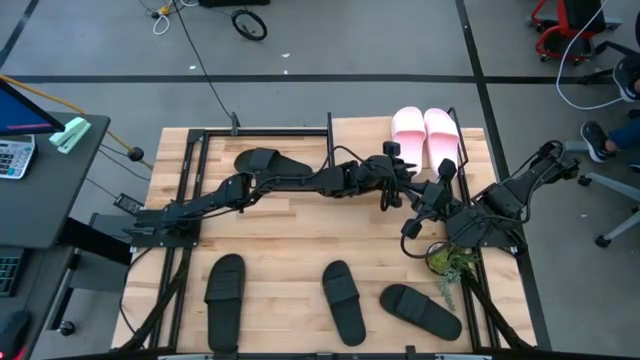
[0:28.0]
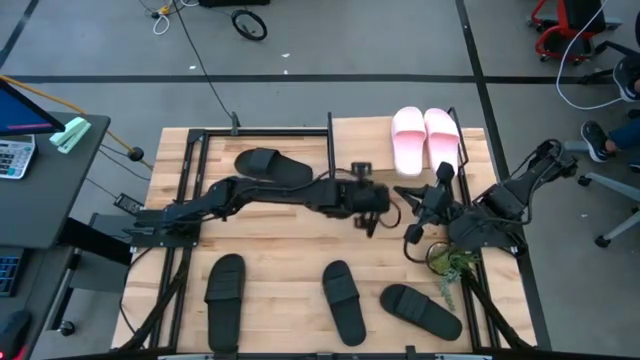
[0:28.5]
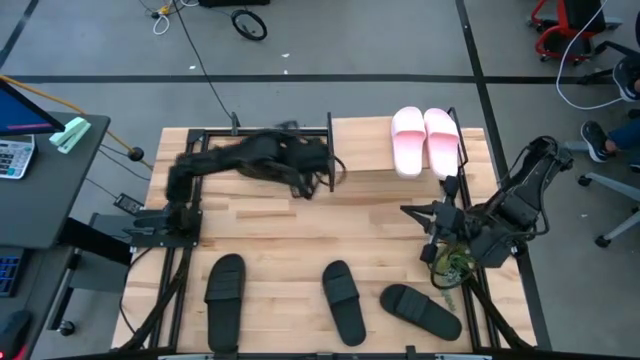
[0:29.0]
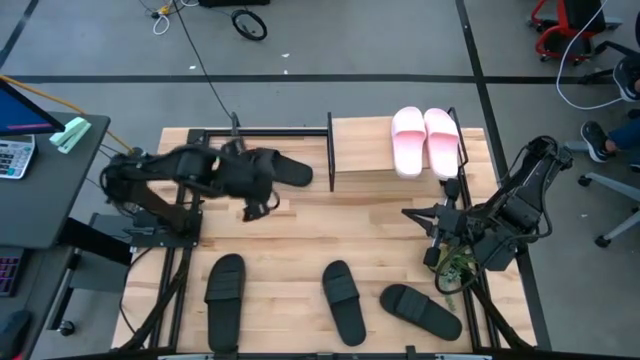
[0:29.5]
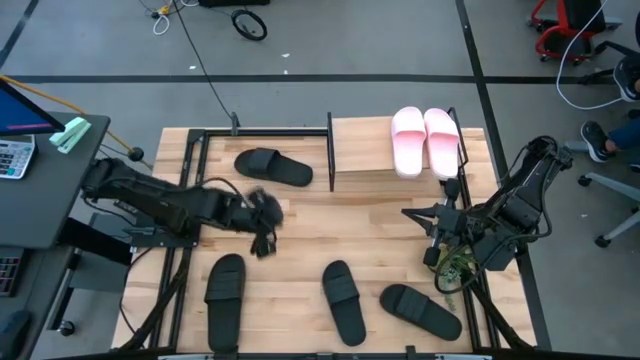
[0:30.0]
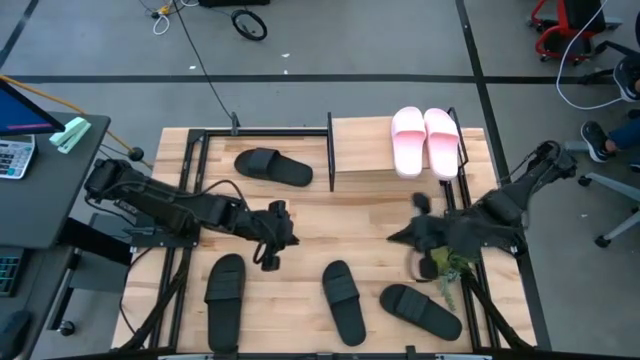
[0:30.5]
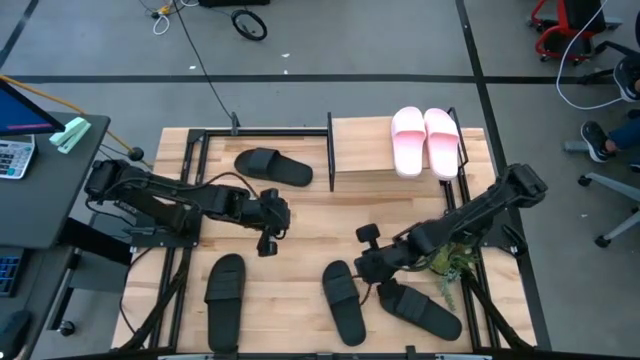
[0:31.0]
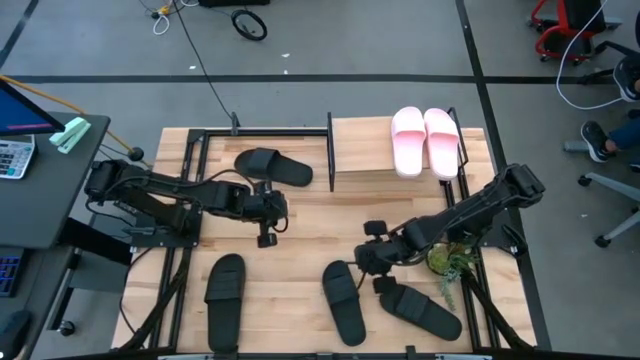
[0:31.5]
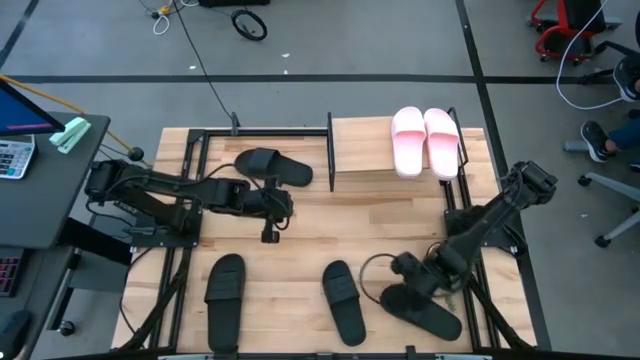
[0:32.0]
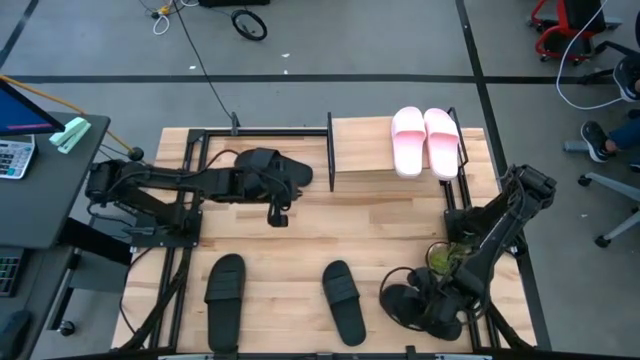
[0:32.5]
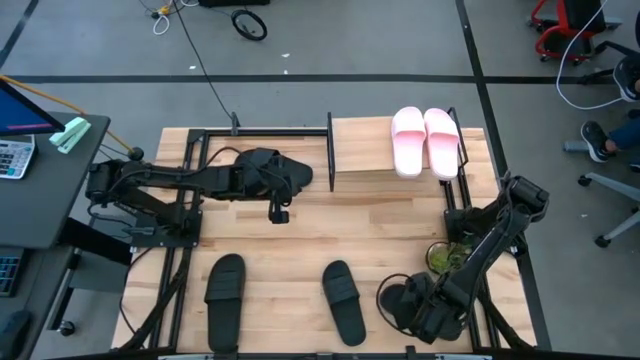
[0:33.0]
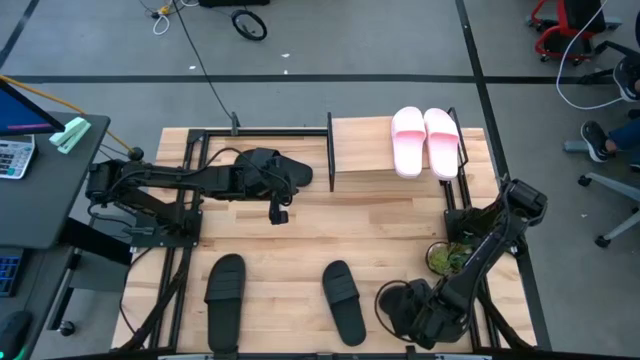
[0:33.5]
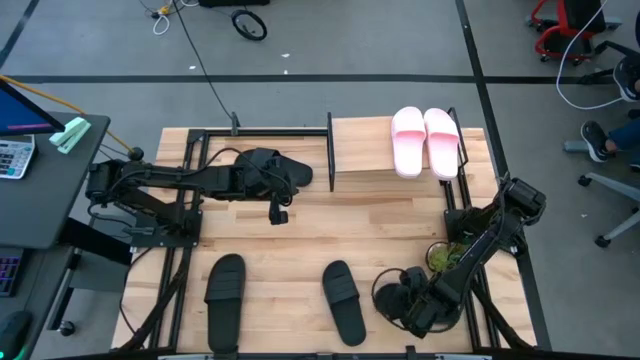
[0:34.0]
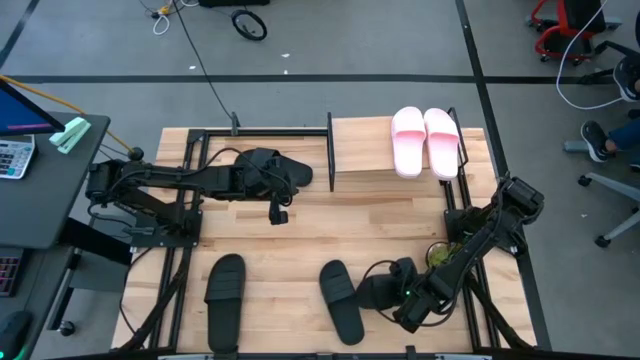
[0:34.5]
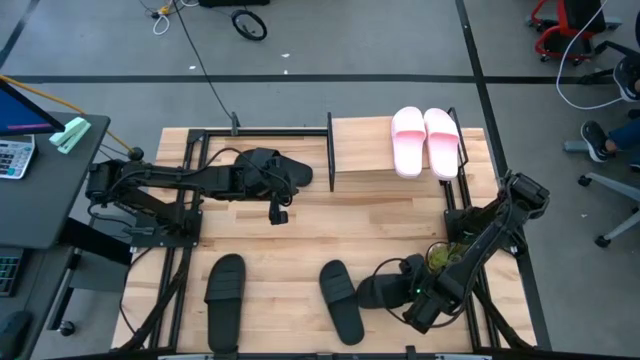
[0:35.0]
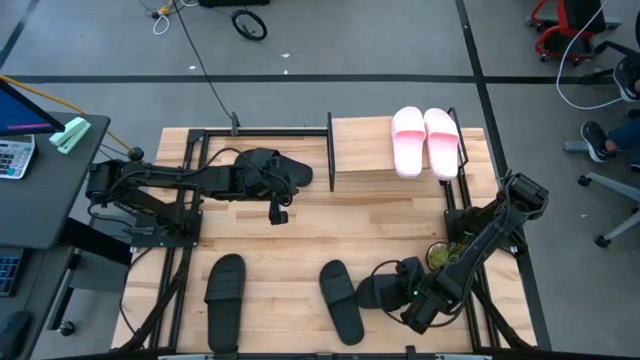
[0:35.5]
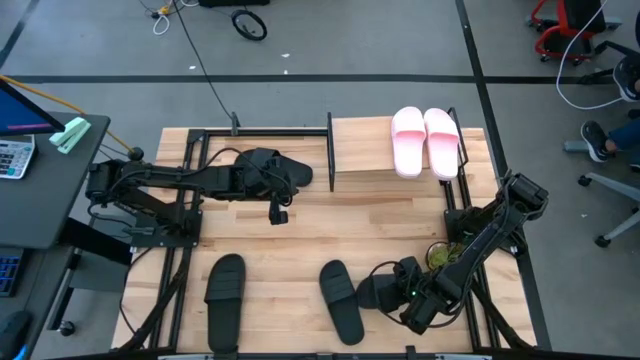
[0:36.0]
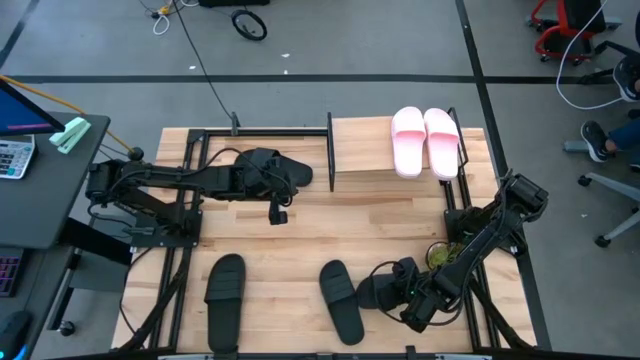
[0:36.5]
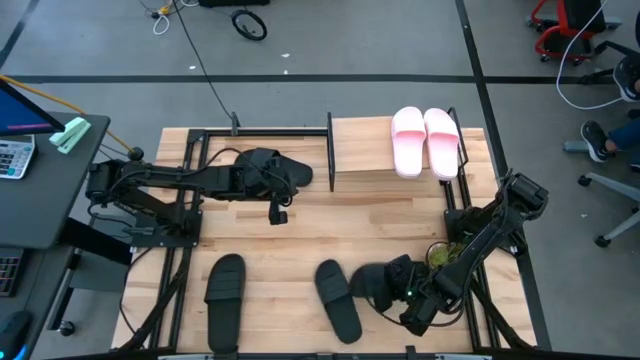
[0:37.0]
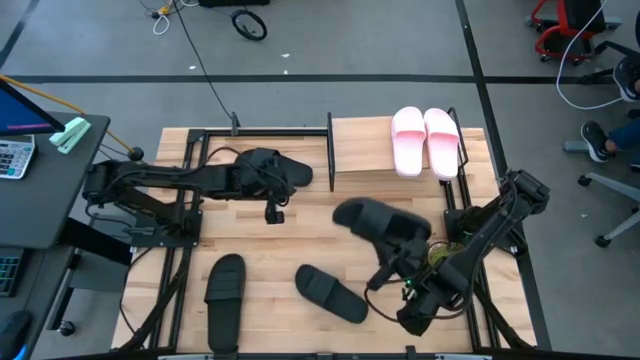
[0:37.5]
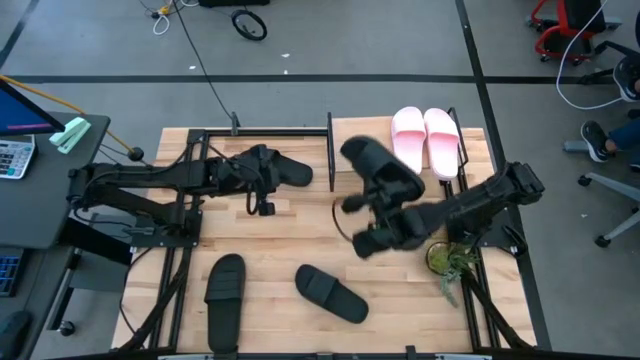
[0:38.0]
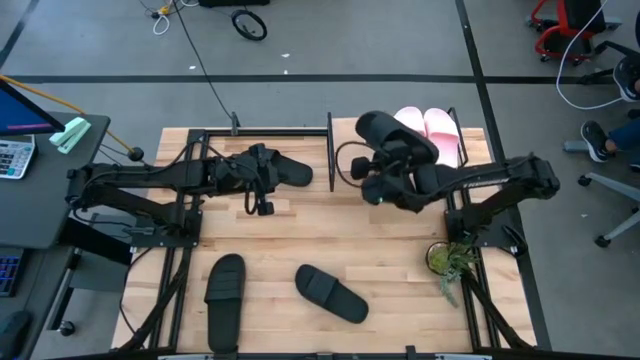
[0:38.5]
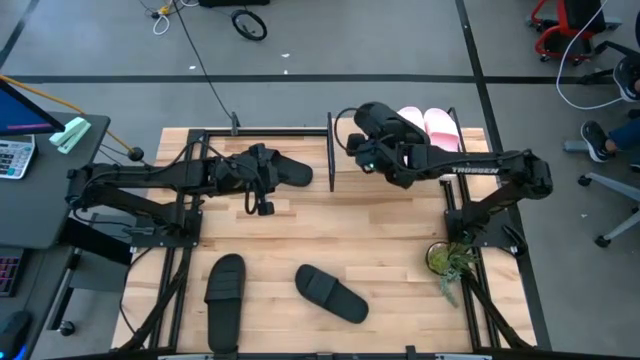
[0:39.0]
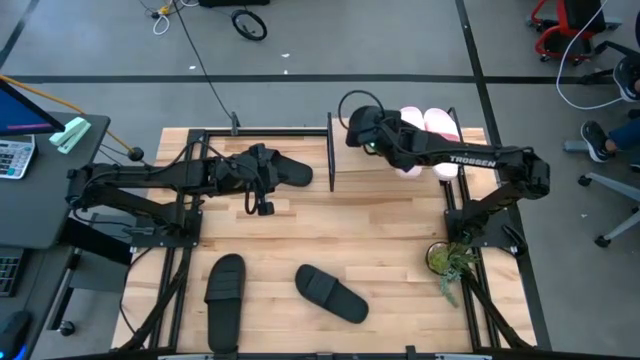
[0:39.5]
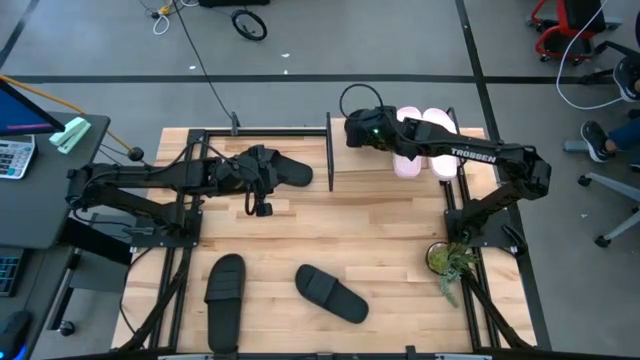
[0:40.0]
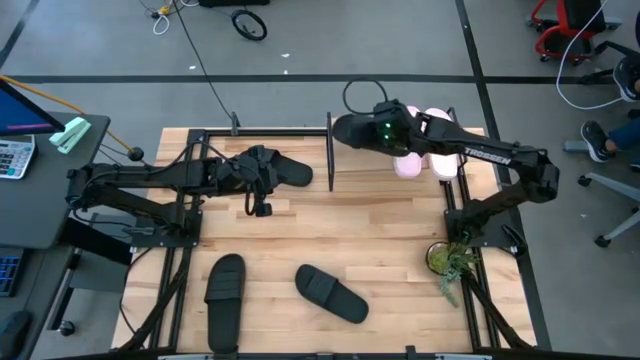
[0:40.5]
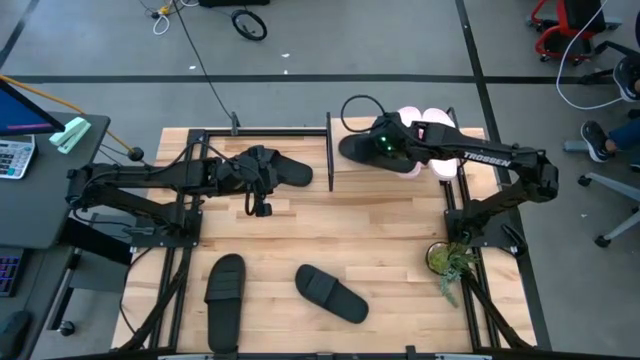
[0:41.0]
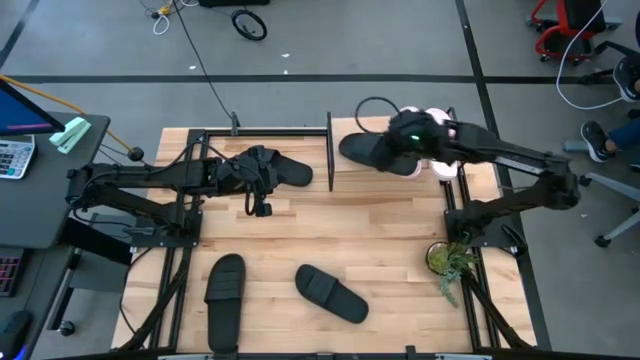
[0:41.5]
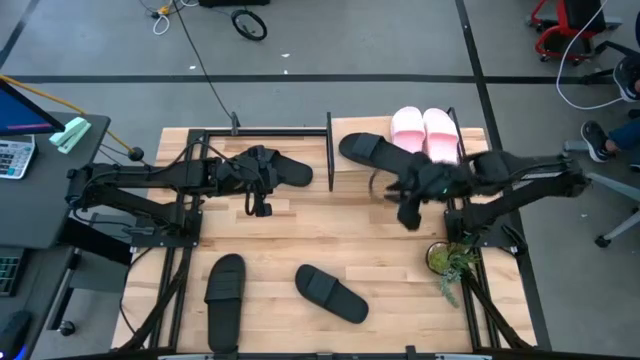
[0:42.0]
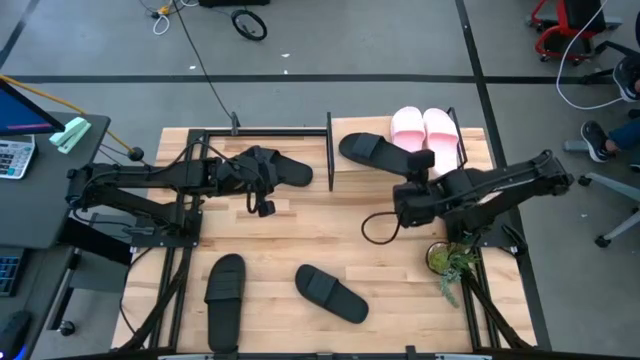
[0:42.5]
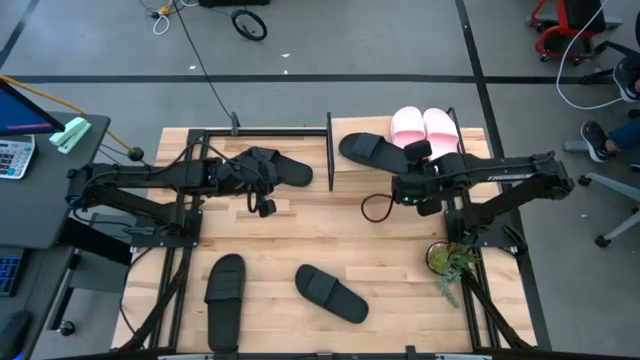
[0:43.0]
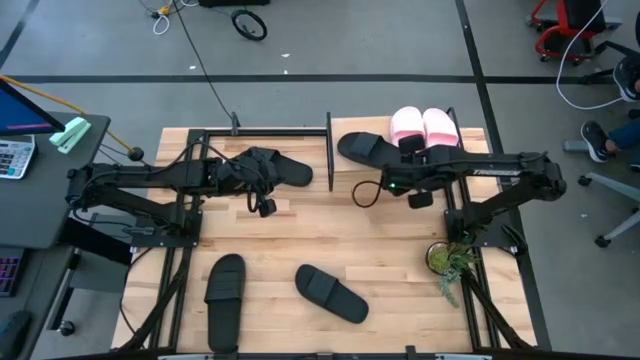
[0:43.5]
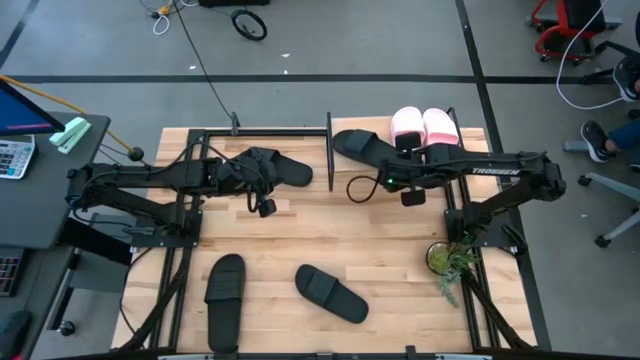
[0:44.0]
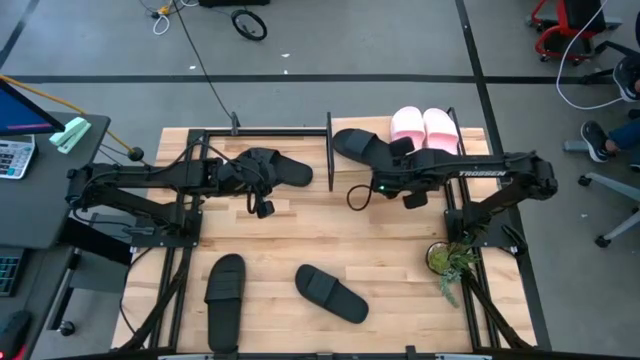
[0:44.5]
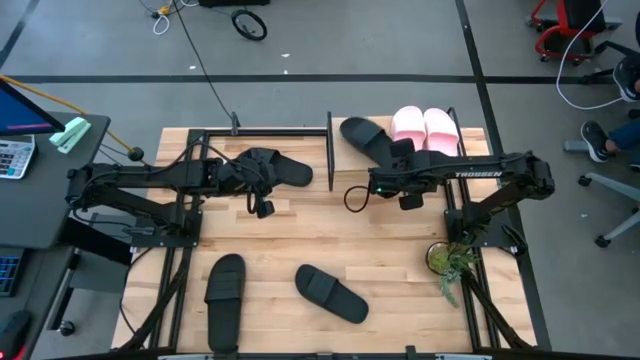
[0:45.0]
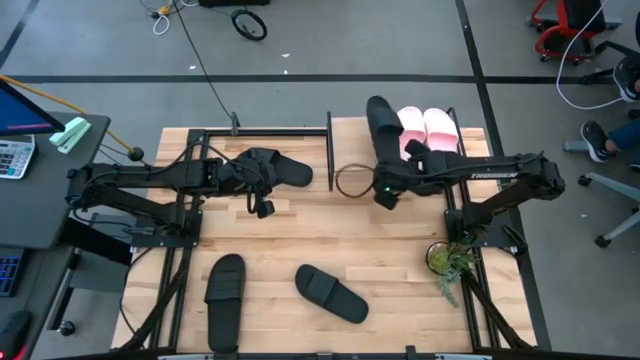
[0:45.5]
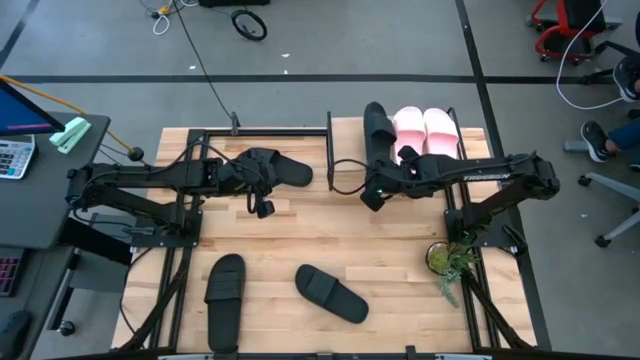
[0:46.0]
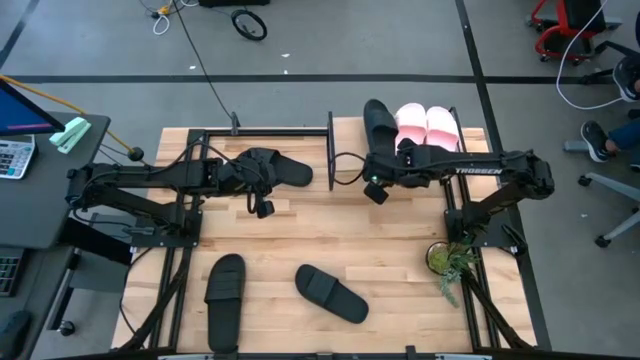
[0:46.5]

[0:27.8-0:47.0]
Task: Pick and place slides into the shelf
Put the black slide on the shelf

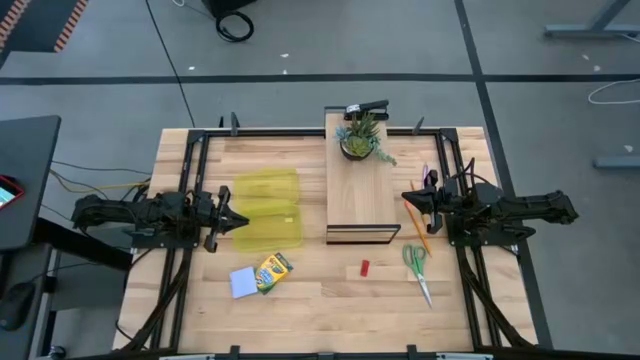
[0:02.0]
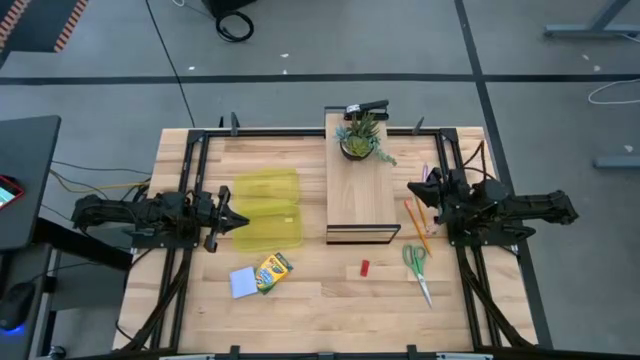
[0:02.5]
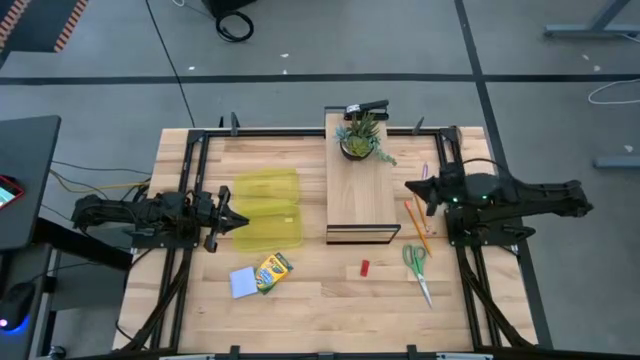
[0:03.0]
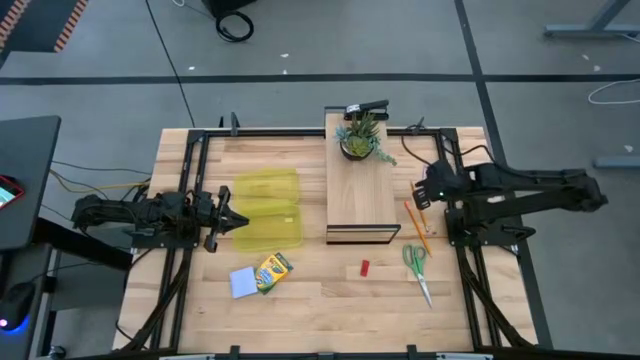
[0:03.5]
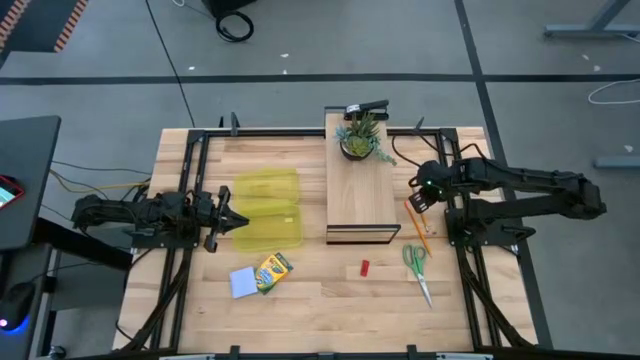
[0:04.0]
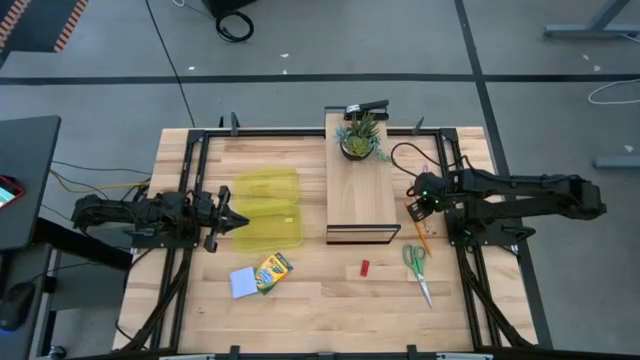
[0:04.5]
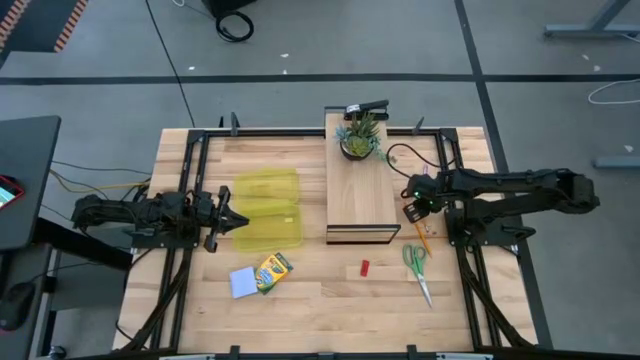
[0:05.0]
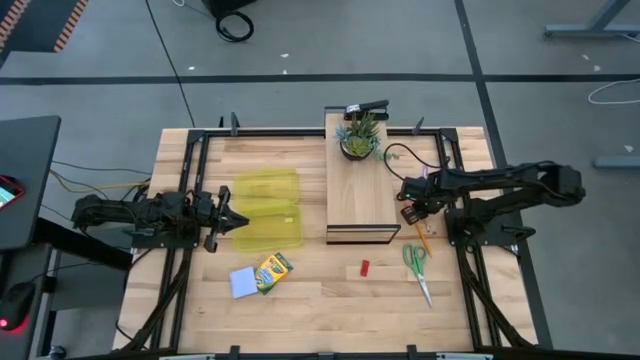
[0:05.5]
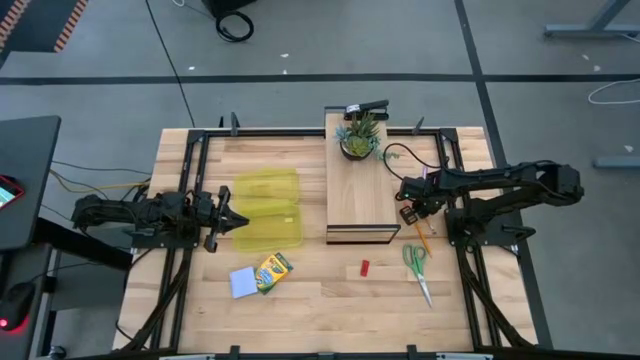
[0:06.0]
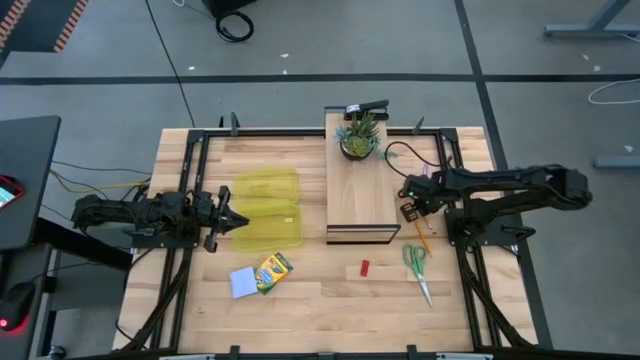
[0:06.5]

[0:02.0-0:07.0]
Task: Pack school essentials
Put the orange pencil into the yellow supply box
